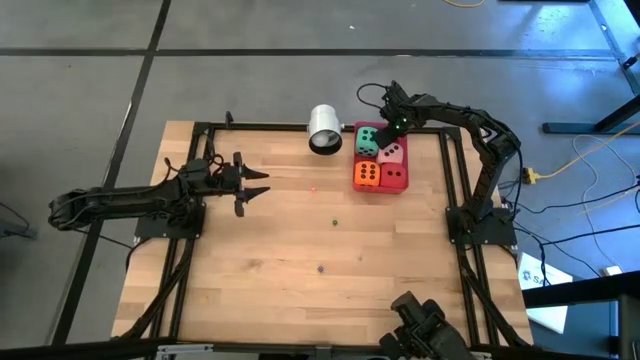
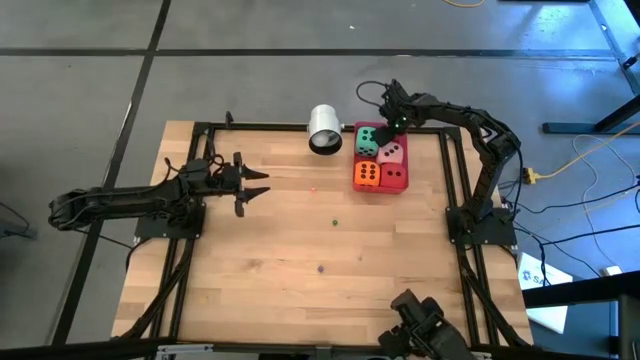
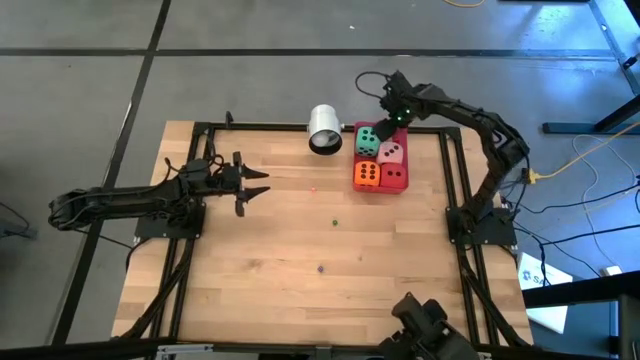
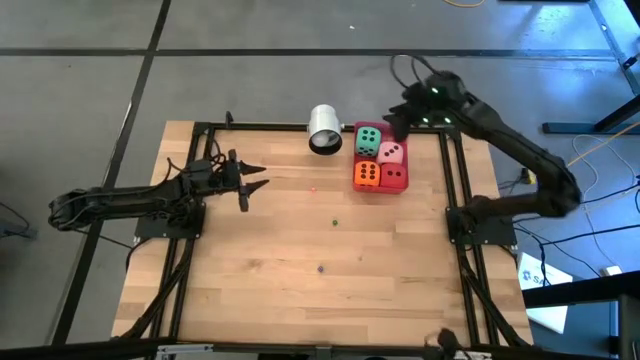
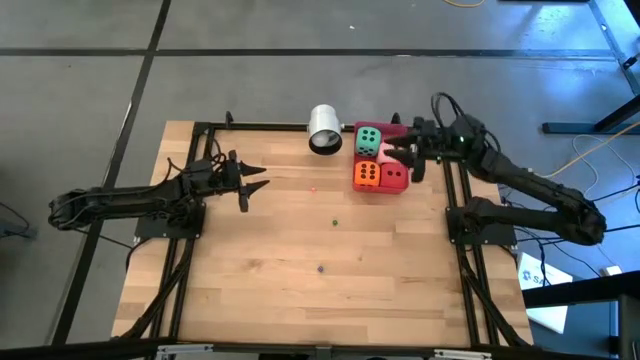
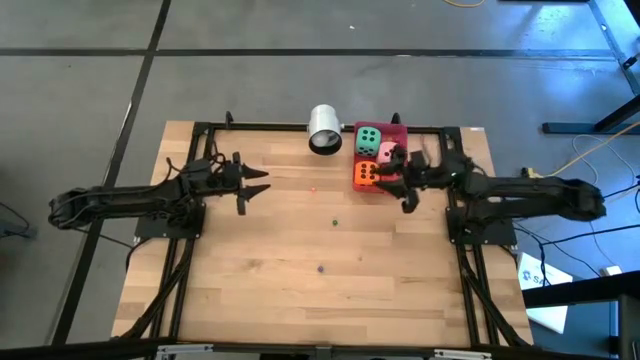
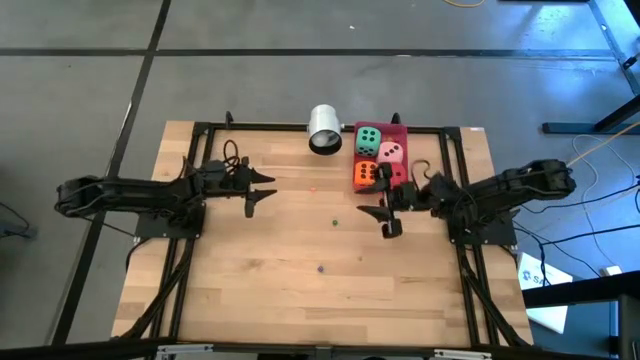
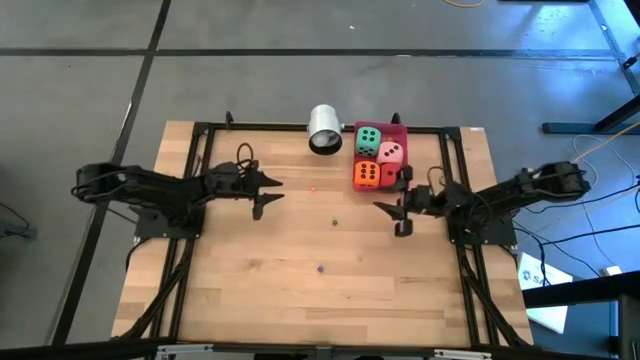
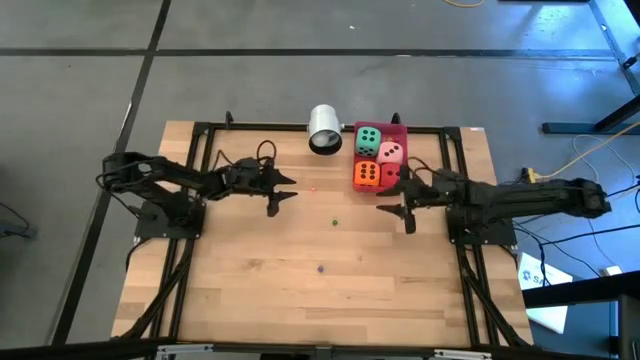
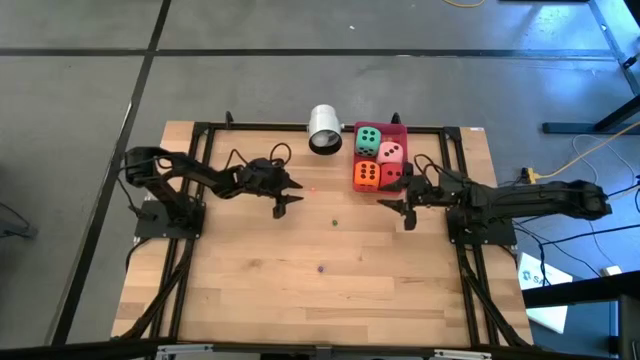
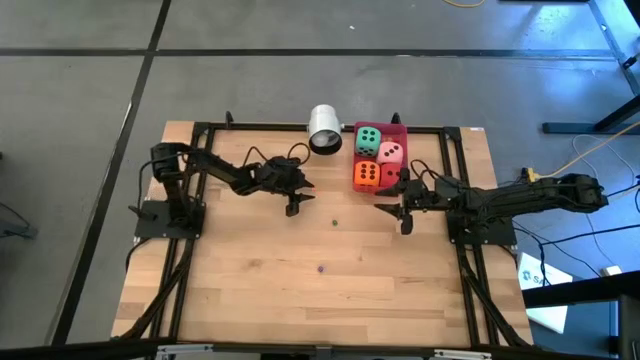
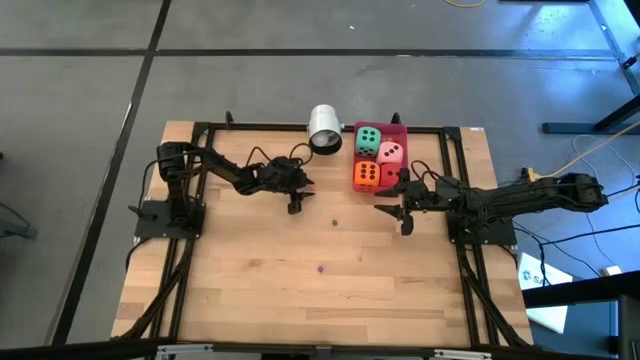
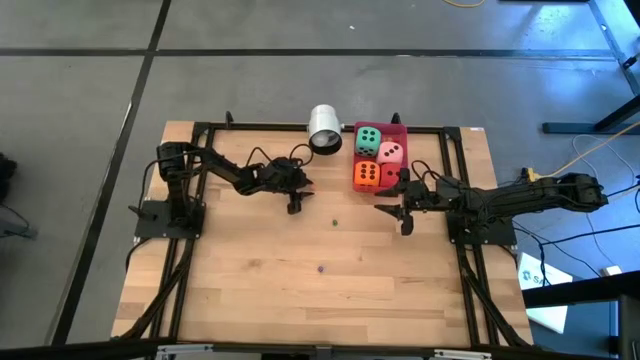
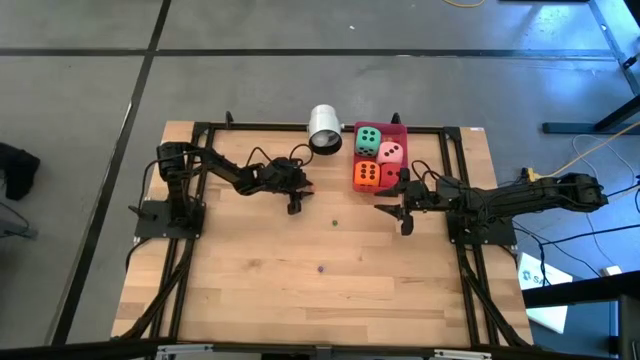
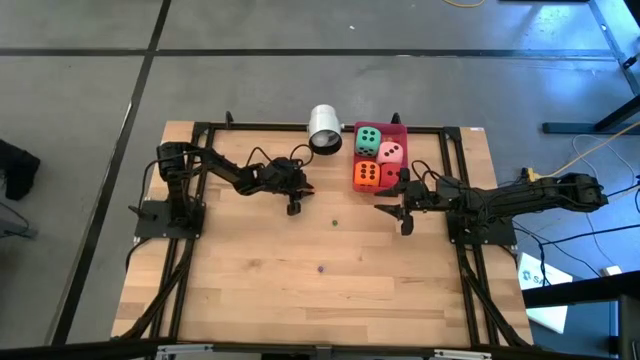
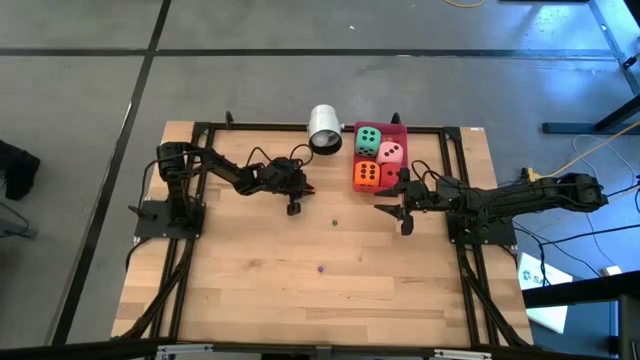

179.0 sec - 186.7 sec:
Task: Pick & Place Dice
Put the small orange dice into the red bin

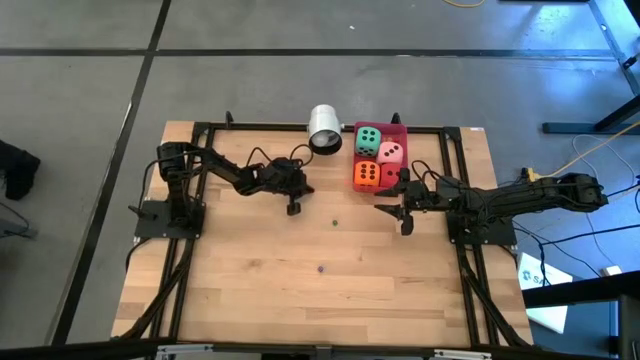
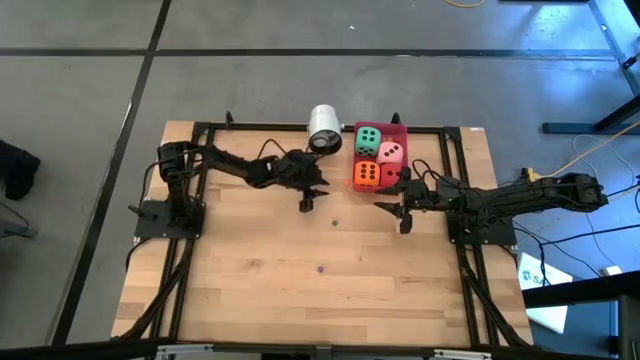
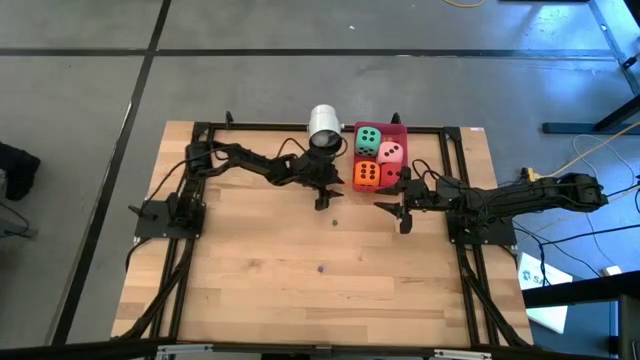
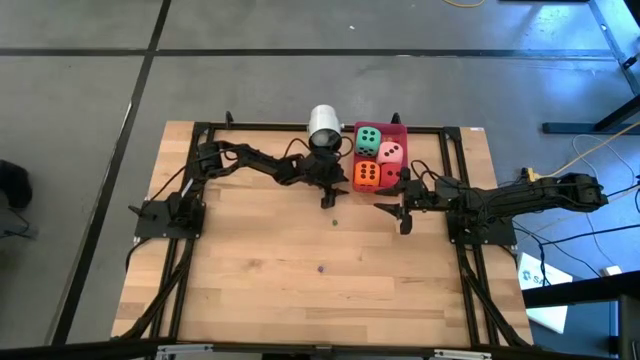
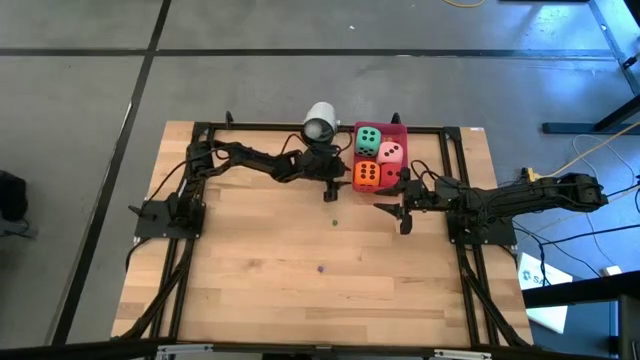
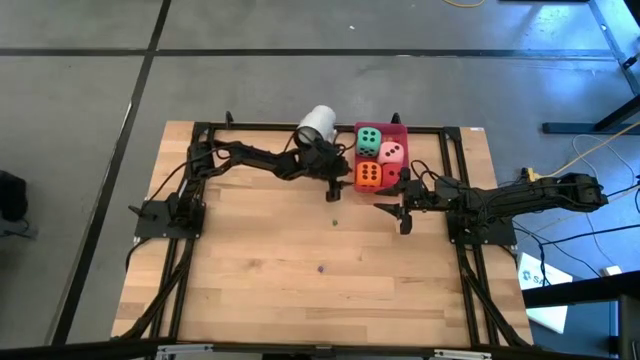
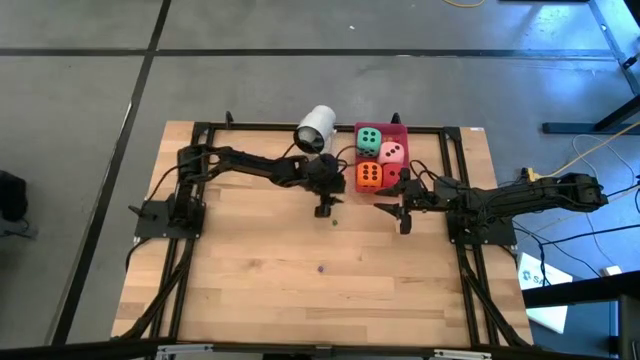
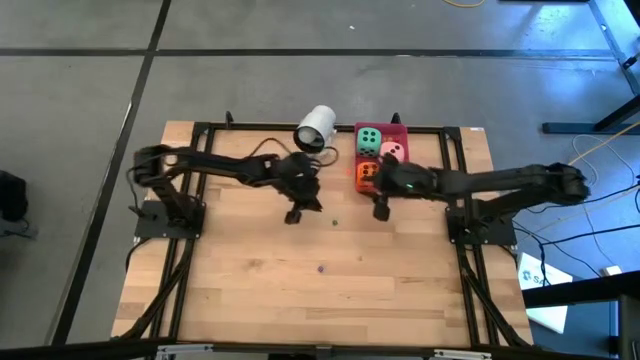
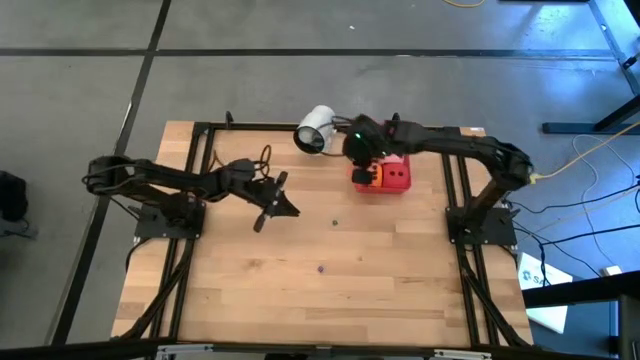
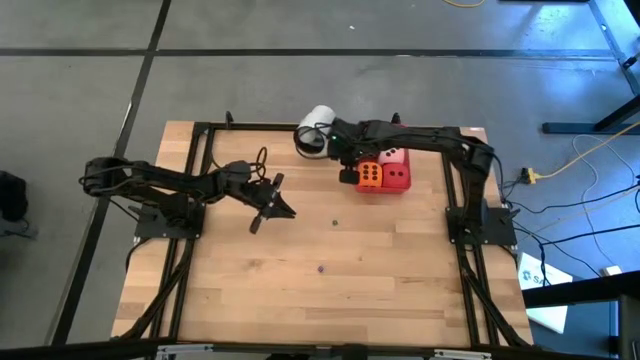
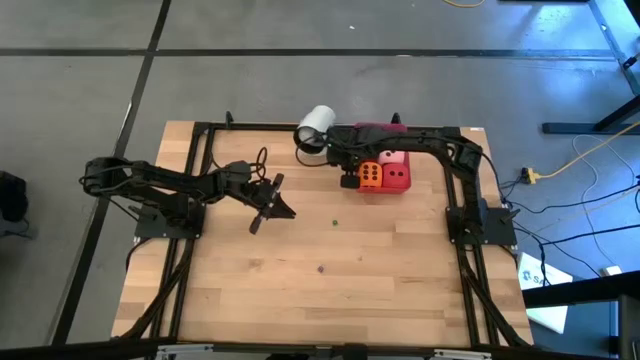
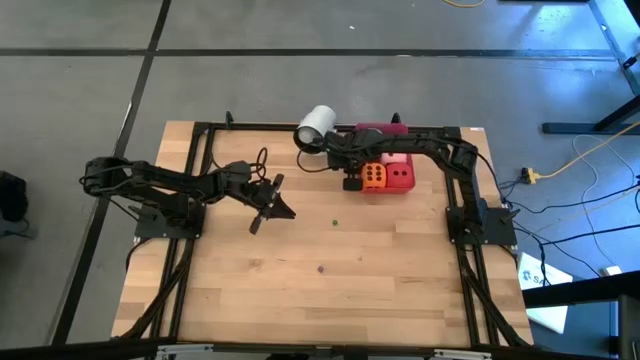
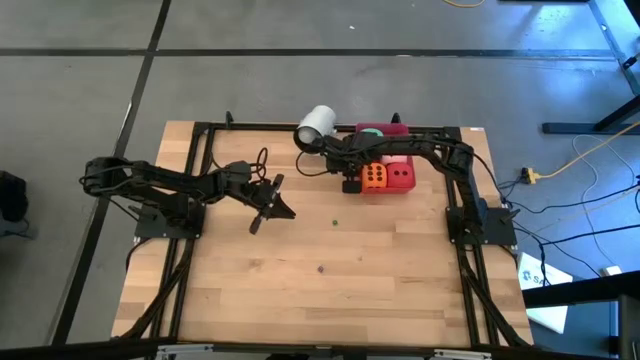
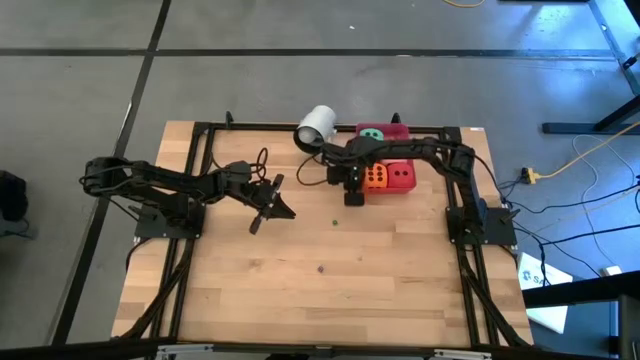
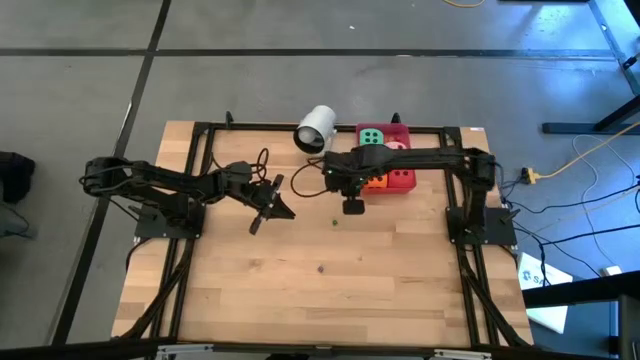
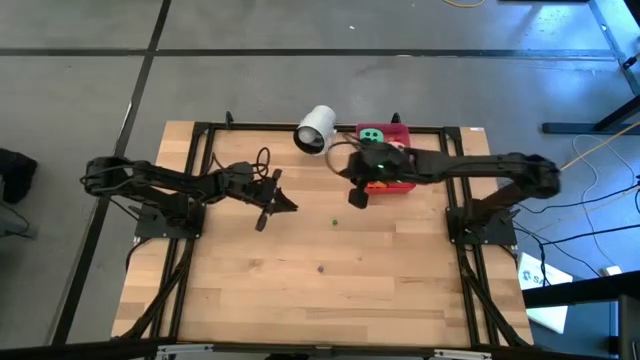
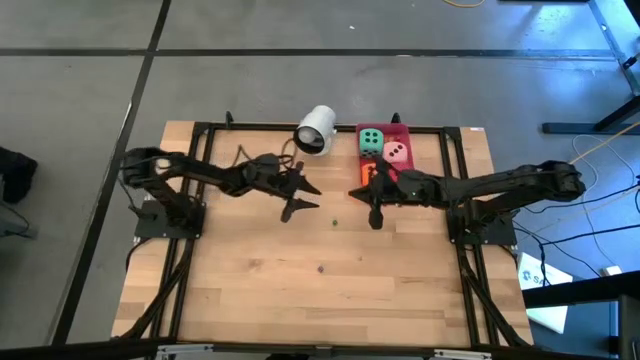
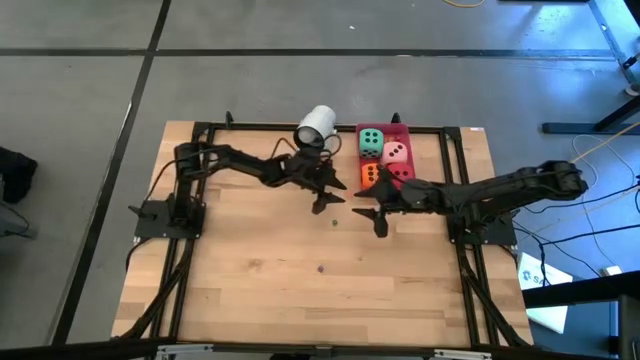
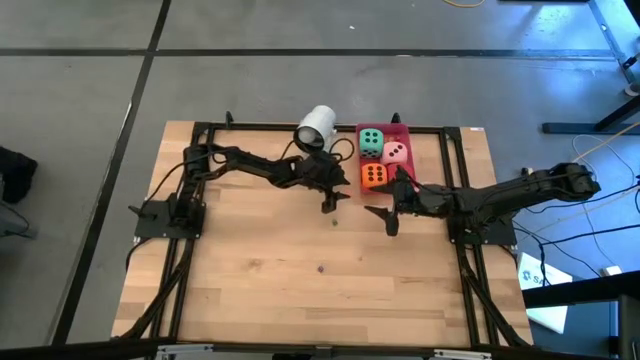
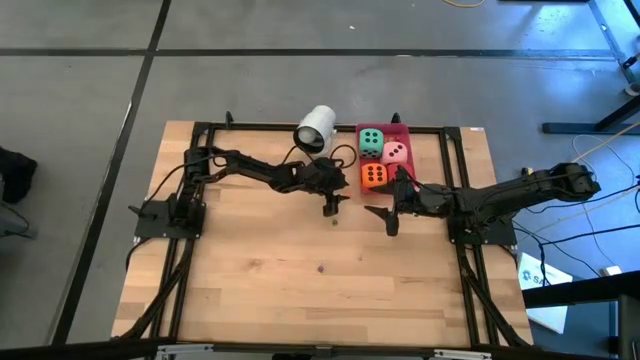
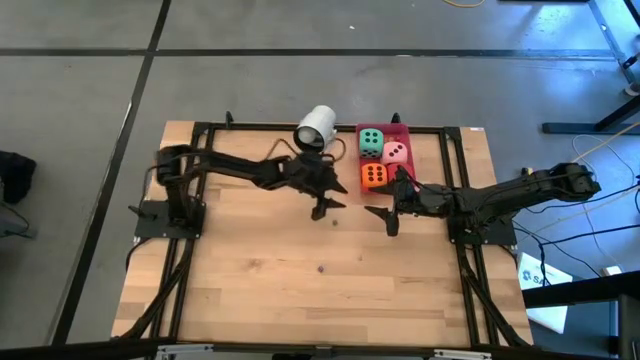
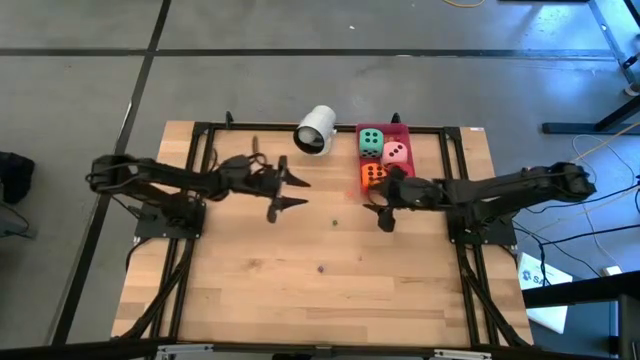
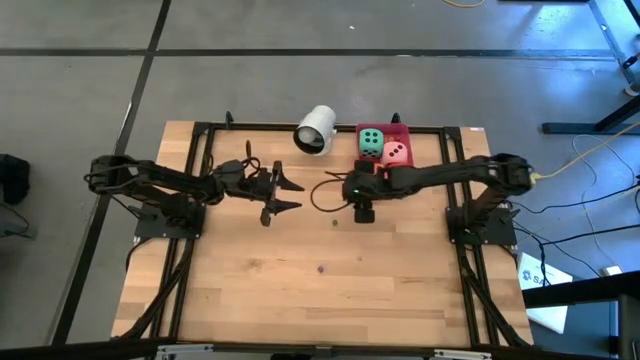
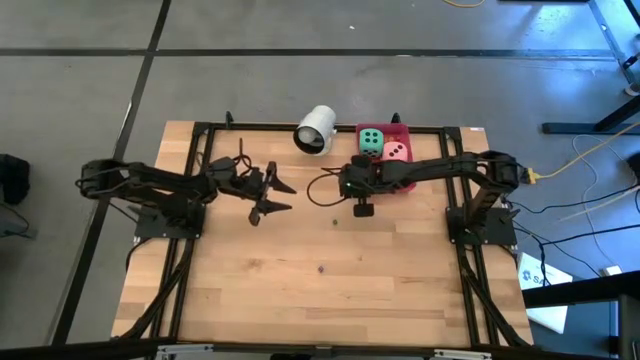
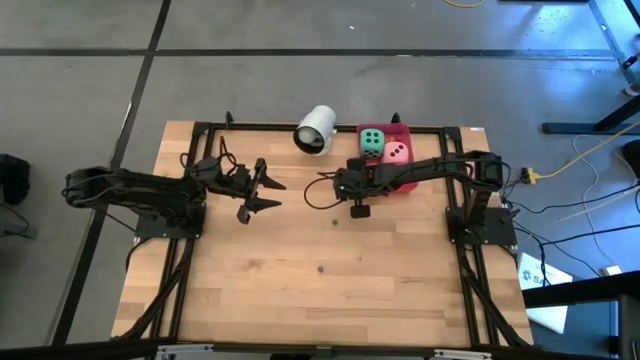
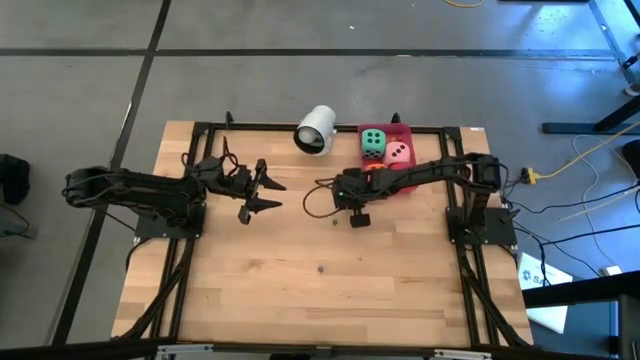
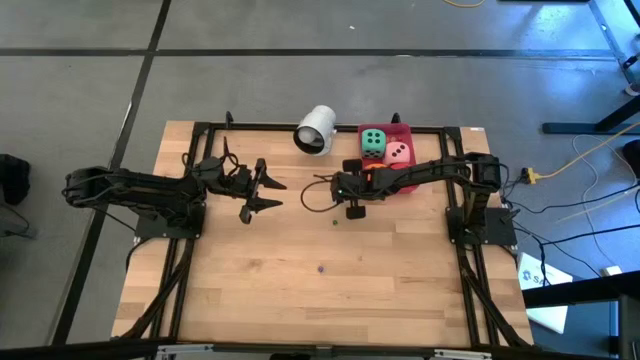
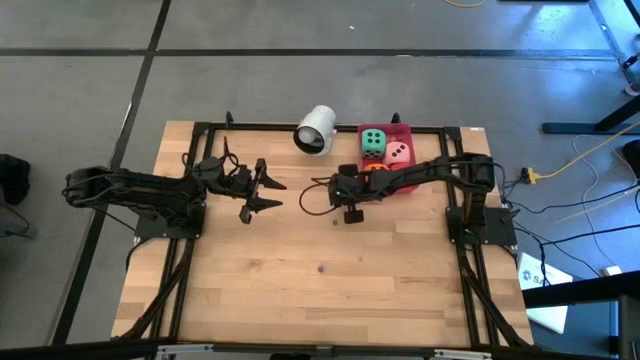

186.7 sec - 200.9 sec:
Move the small orange dice to the middle of the table

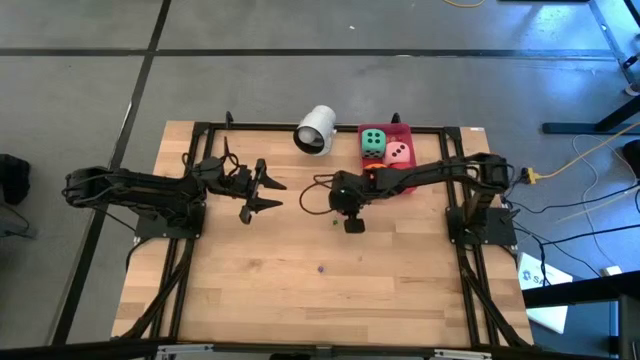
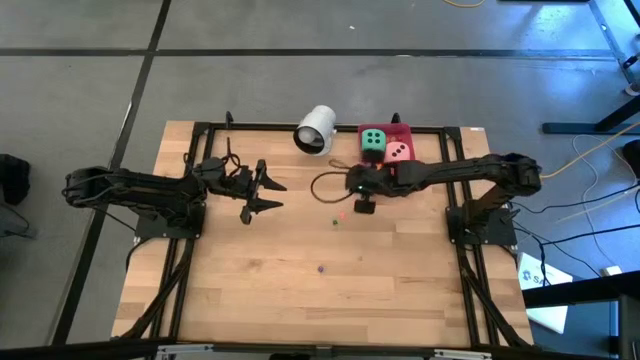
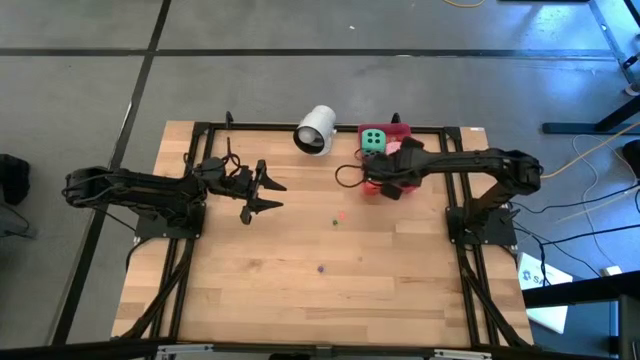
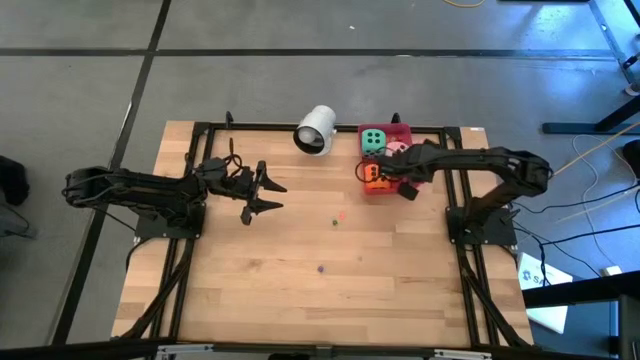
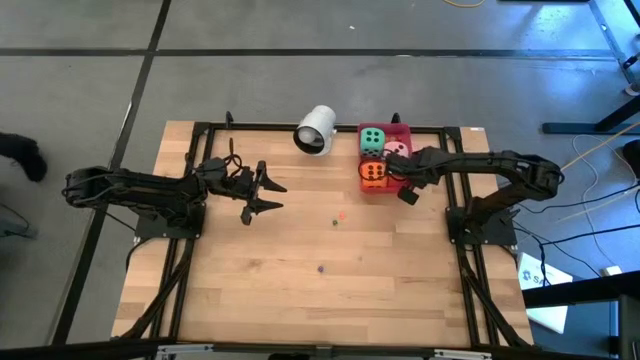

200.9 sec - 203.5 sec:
Adjust the red bin on the table
